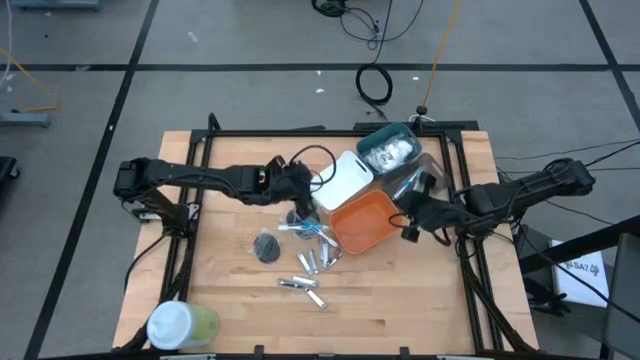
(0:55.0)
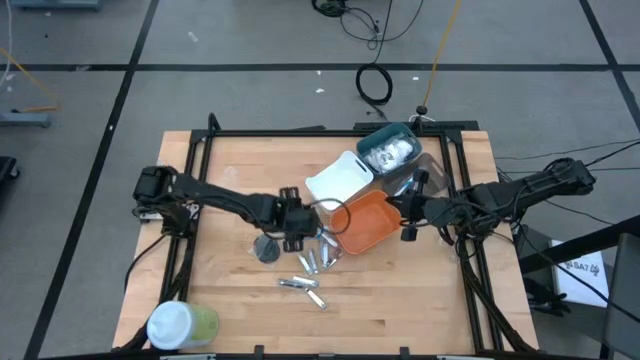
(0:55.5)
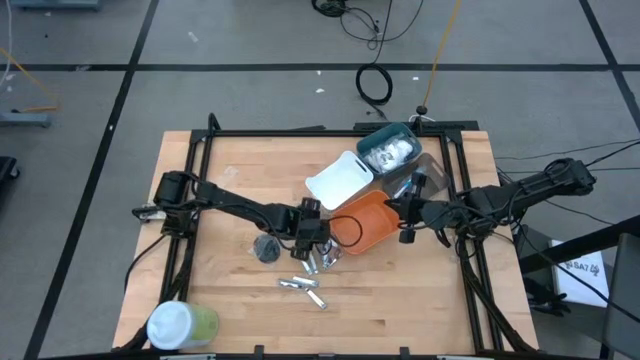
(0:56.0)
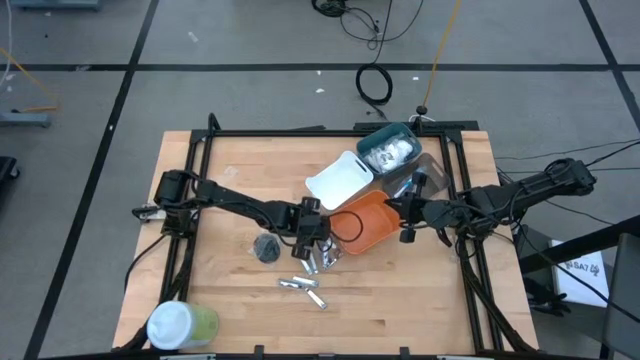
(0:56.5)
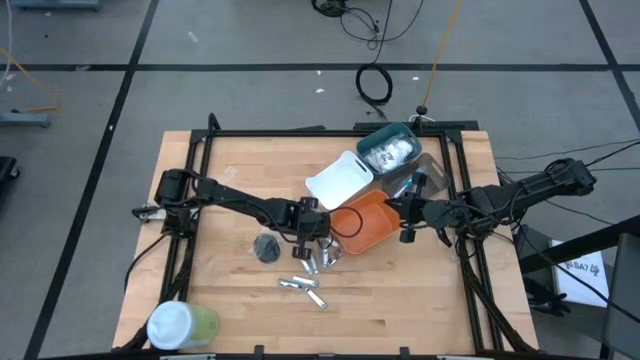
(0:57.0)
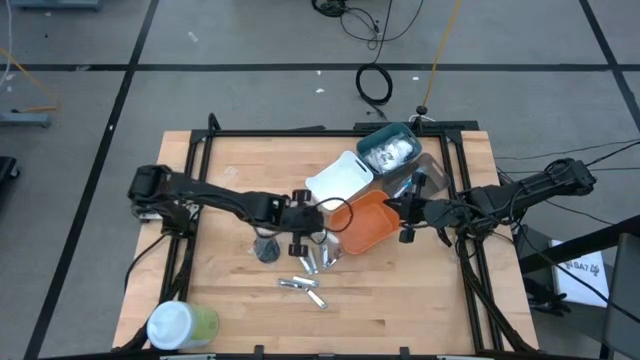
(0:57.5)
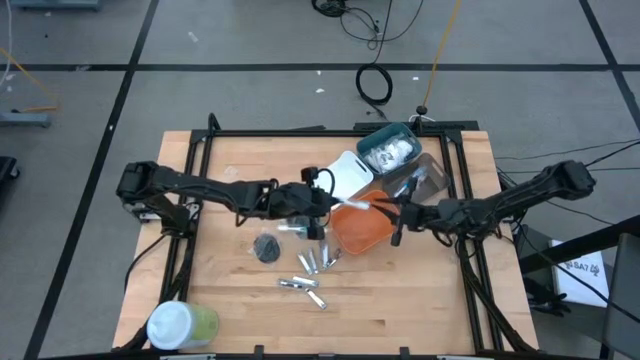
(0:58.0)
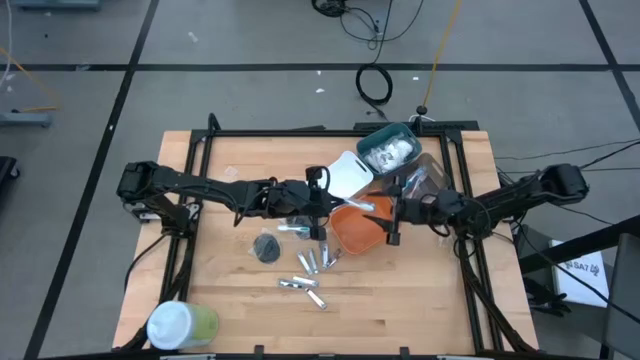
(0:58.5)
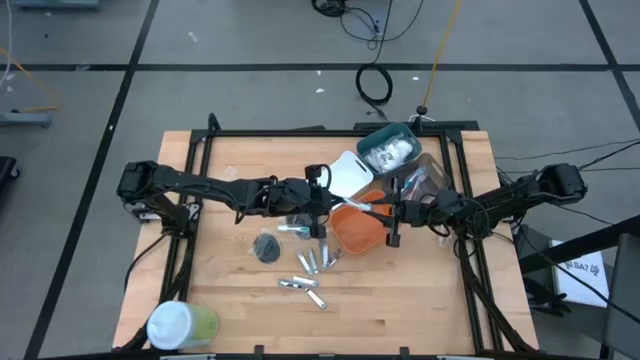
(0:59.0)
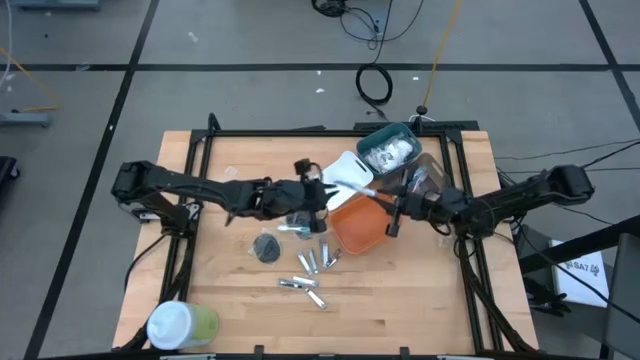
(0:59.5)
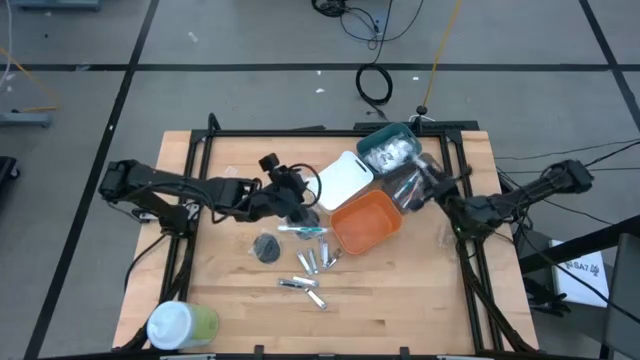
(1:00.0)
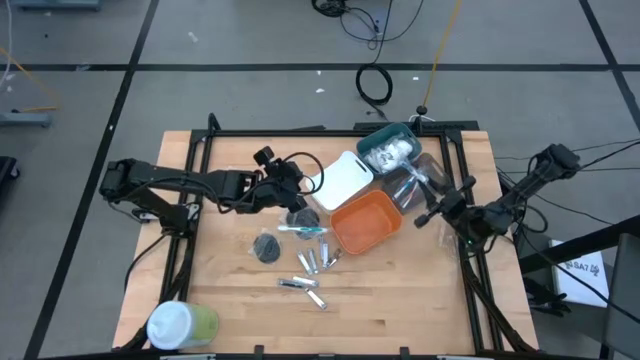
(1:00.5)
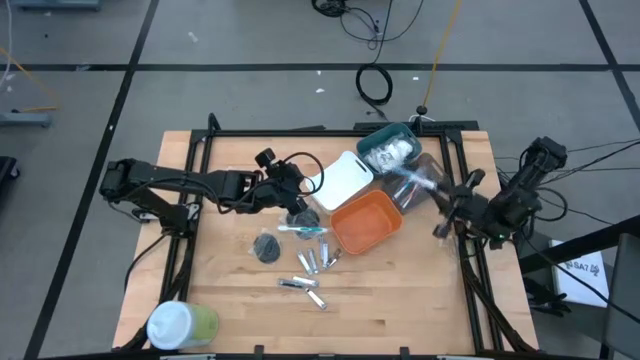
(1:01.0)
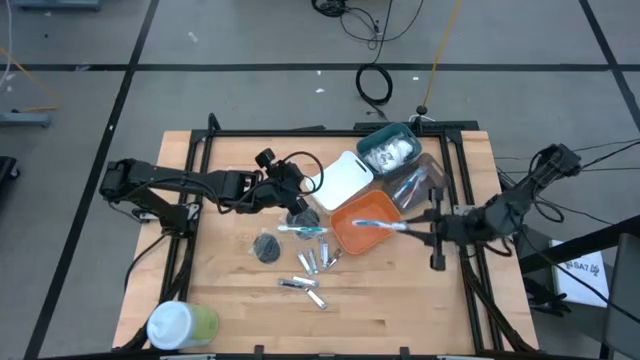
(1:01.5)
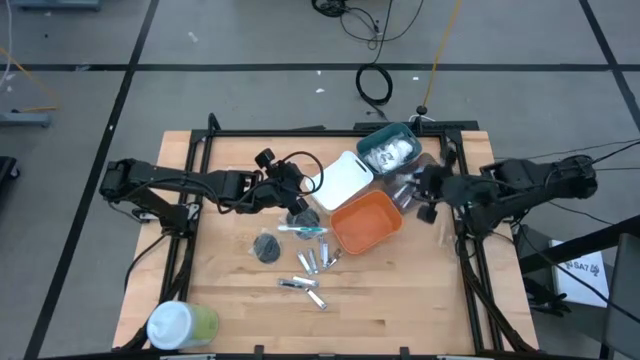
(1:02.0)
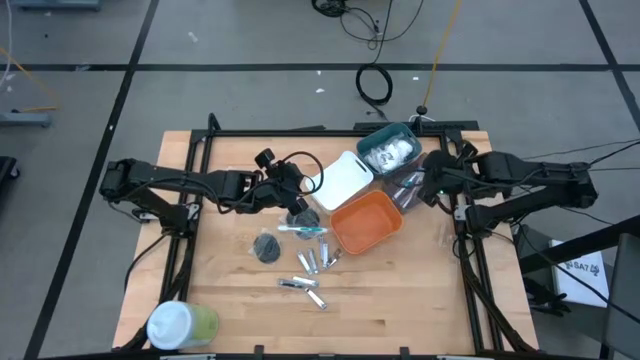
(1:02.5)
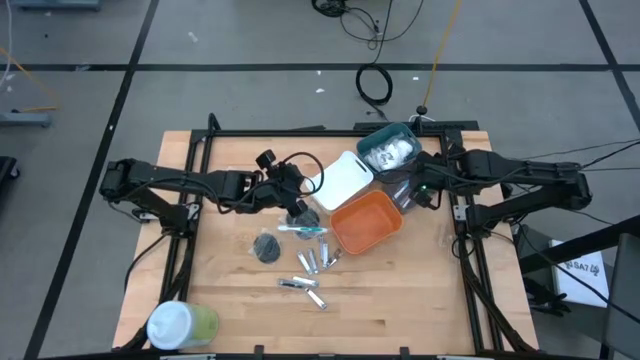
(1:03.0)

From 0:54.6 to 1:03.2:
Task: Pick & Place Travel size toiletries
Put the blue toothbrush into the black bin

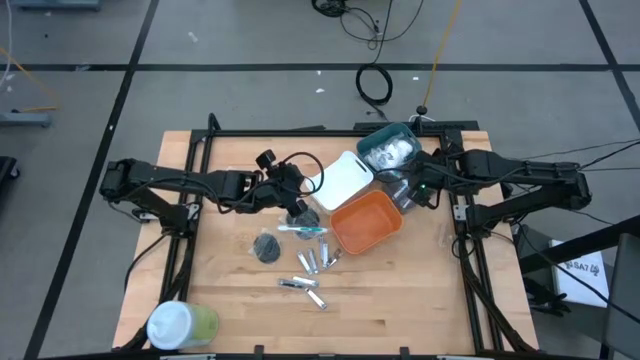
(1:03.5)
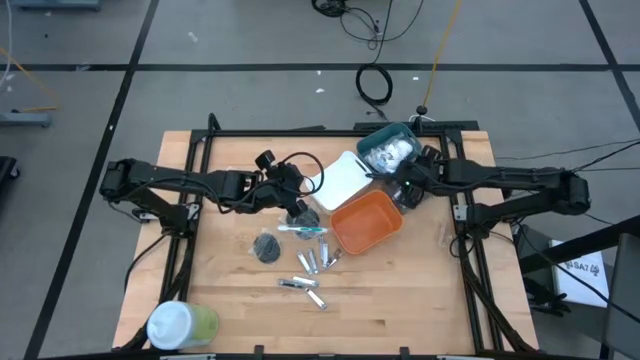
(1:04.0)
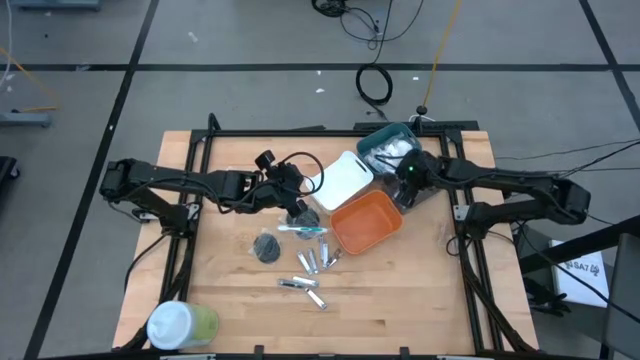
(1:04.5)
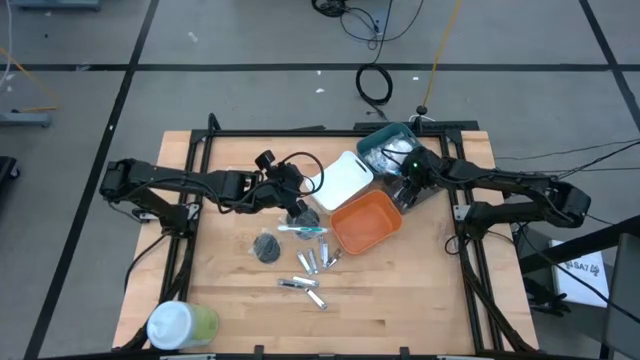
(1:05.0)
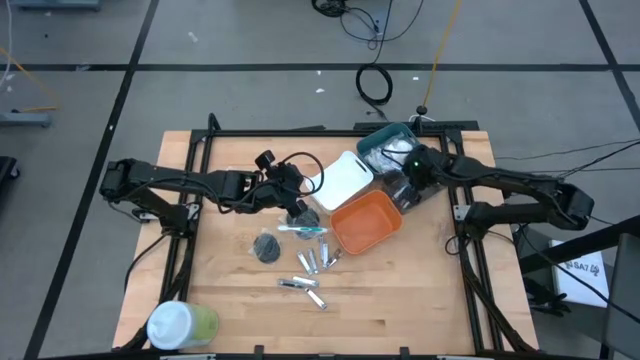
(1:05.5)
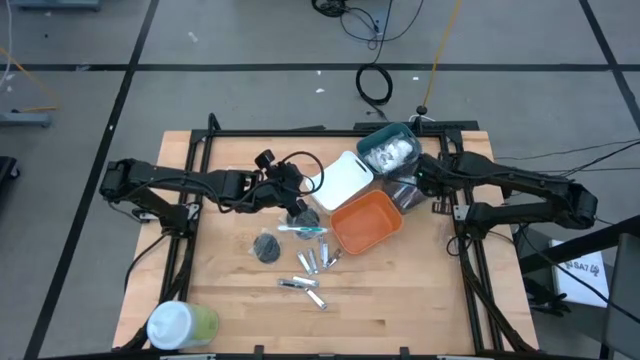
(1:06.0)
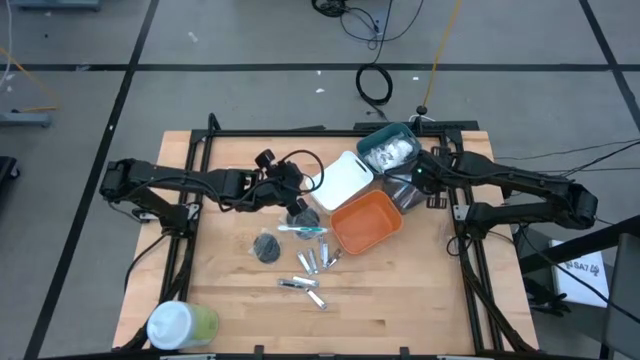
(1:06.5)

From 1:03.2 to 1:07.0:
Put the blue toothbrush into the black bin

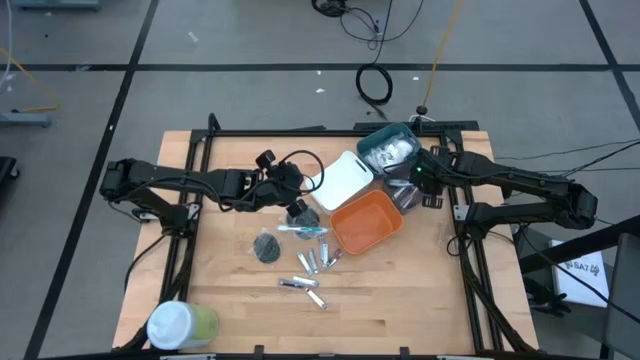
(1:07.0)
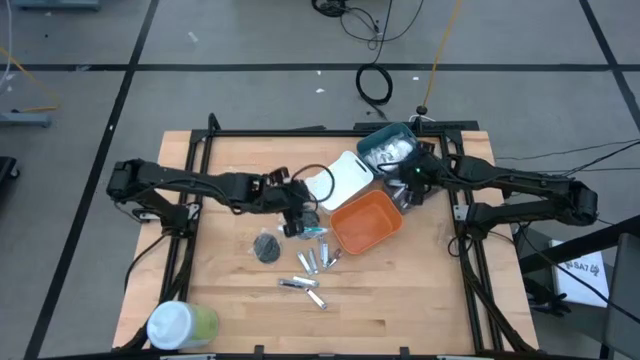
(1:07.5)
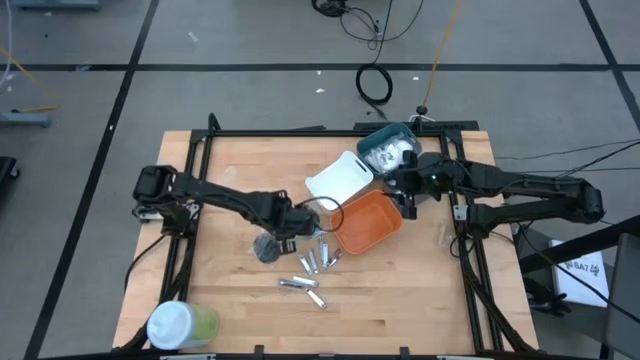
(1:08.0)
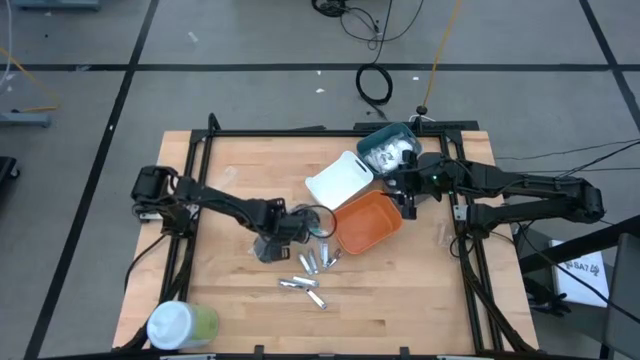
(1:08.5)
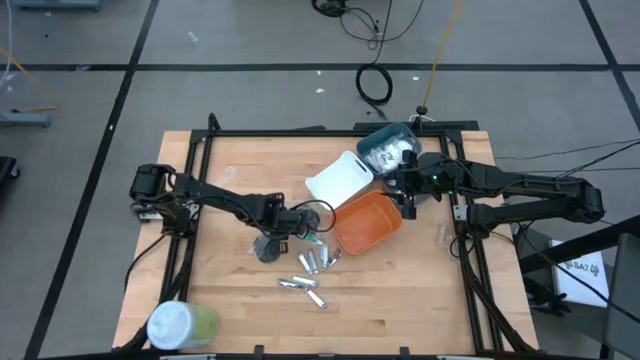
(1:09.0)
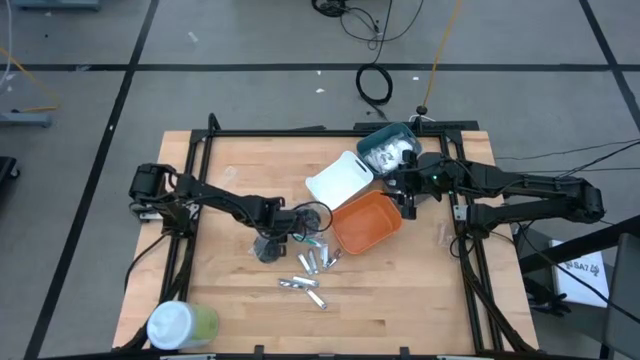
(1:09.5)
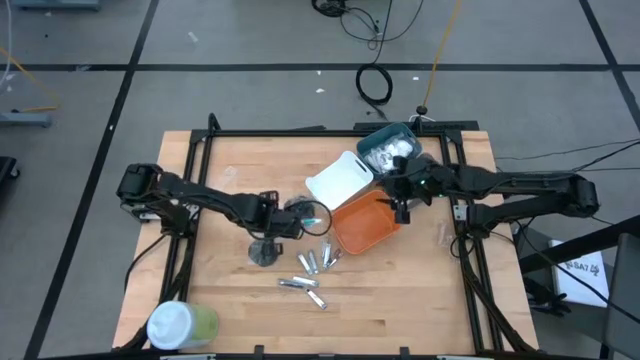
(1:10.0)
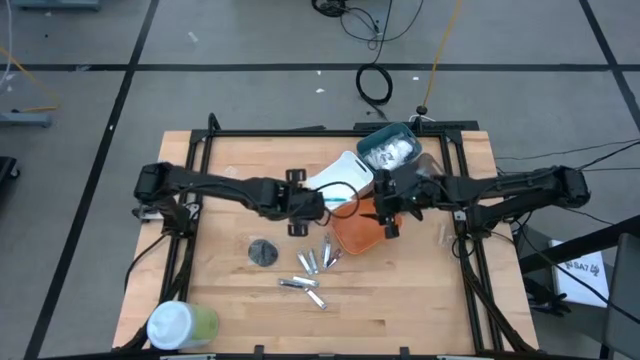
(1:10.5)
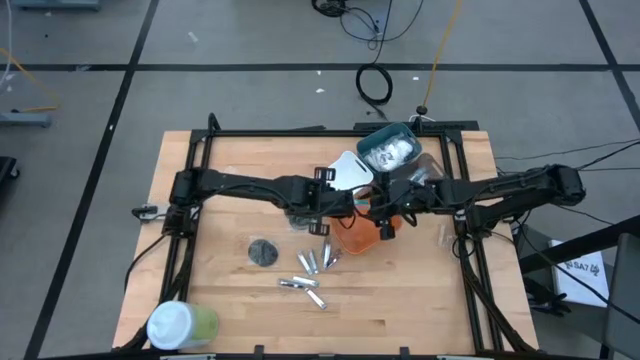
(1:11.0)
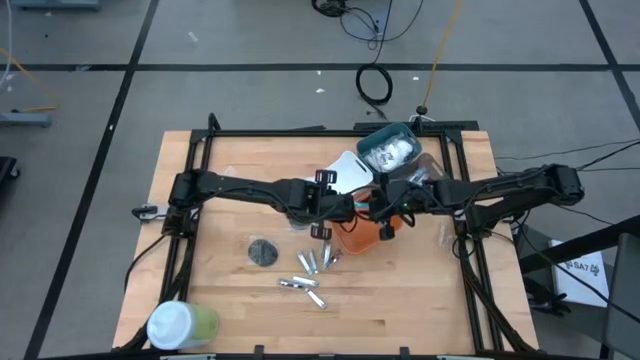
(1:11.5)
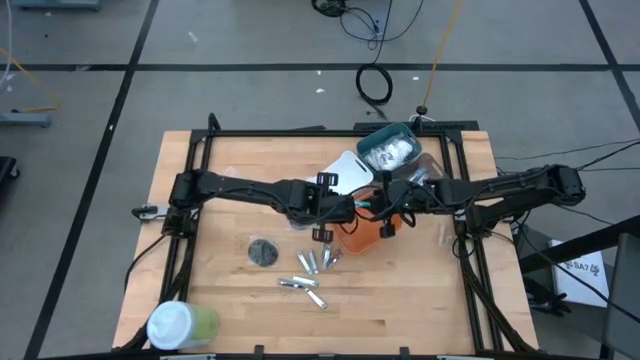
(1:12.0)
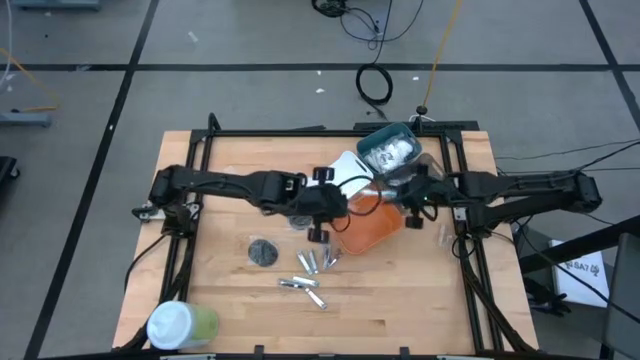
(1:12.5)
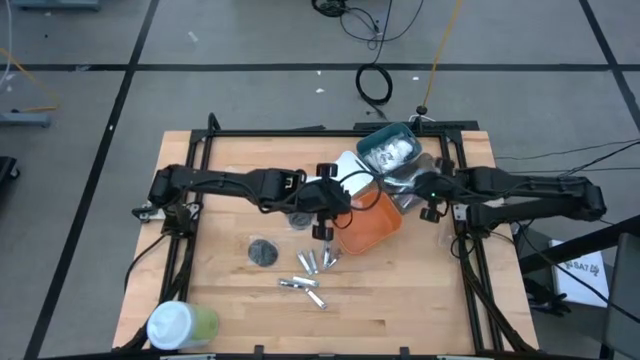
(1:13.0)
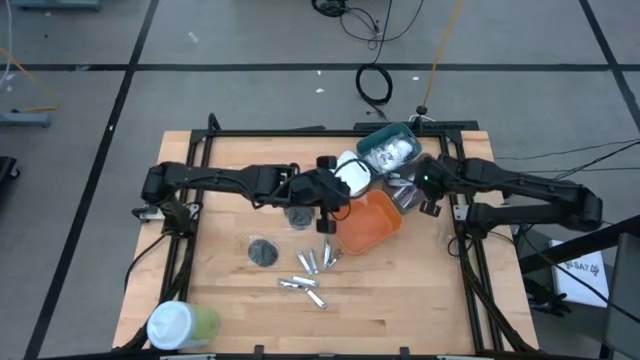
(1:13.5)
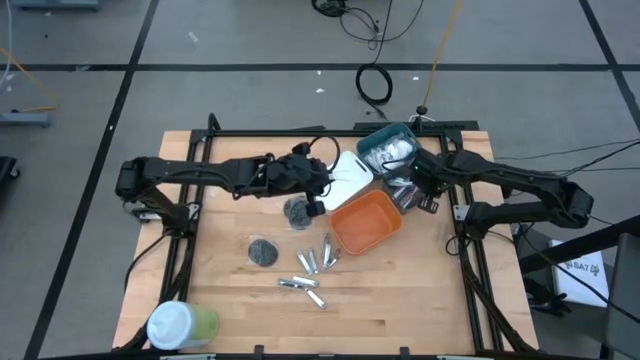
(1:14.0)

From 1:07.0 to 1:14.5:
Put the green toothbrush into the black bin

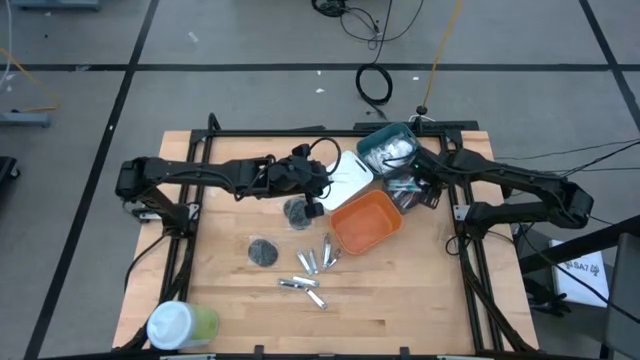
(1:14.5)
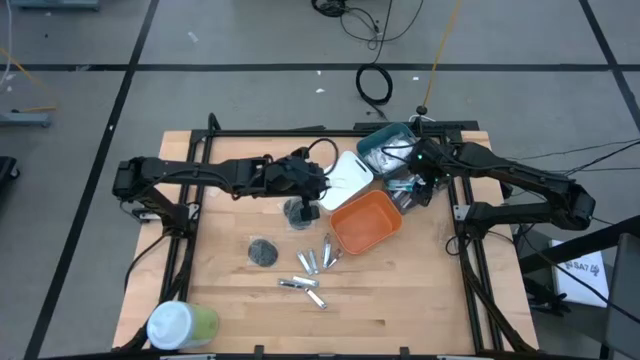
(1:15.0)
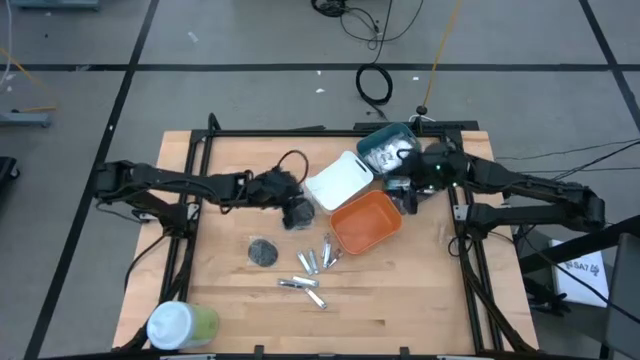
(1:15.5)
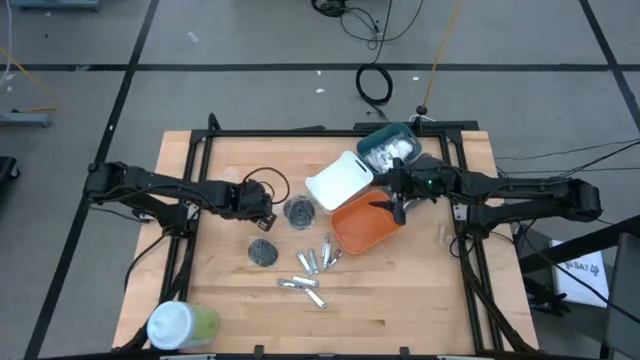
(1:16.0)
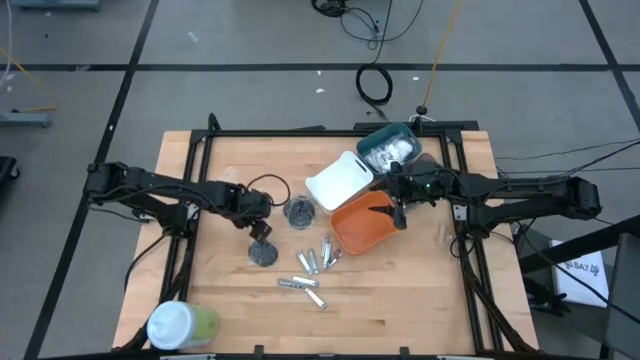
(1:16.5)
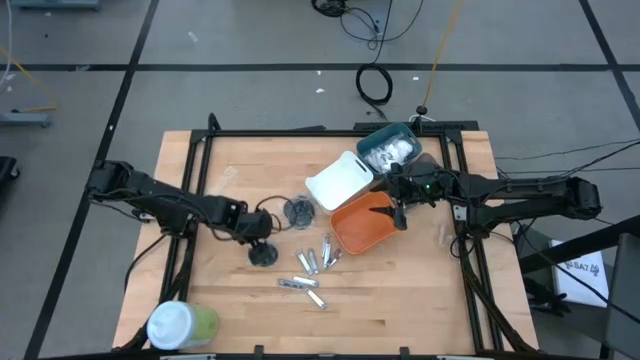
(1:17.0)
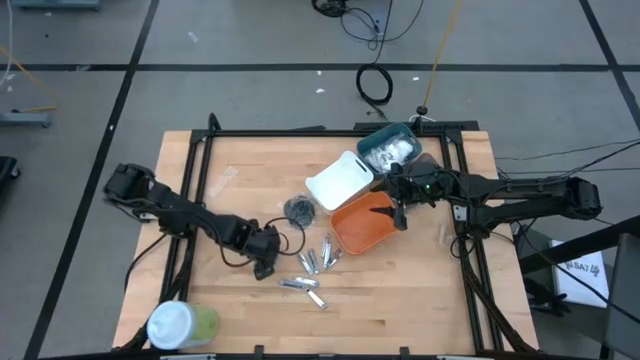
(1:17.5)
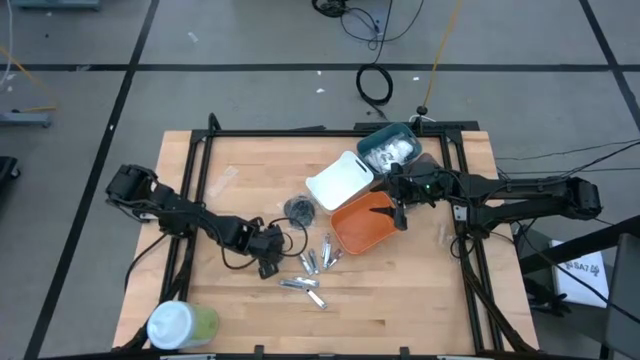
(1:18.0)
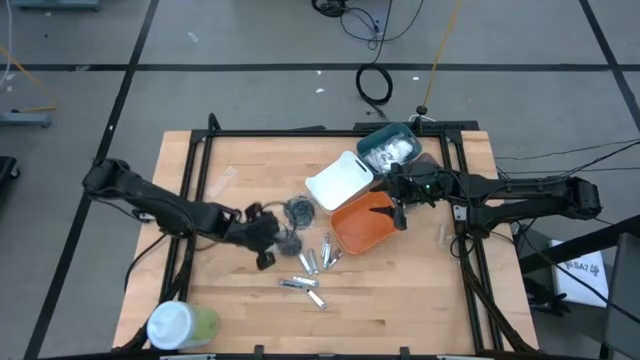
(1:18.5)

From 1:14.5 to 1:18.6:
Put the black hairbrush into the white bin
